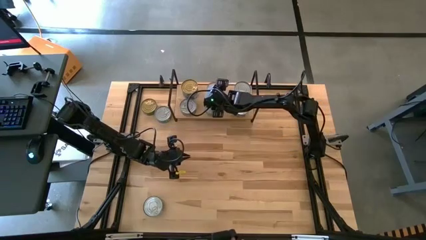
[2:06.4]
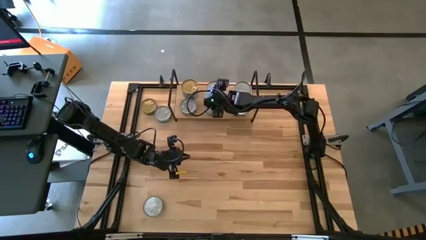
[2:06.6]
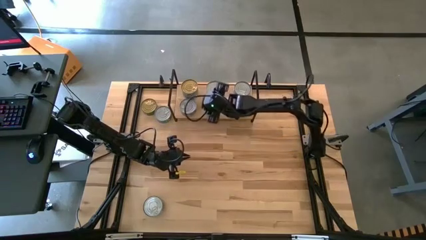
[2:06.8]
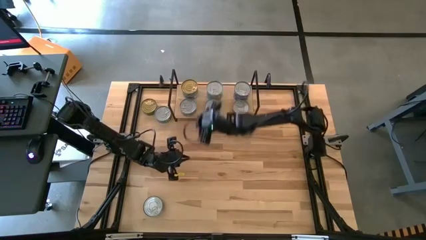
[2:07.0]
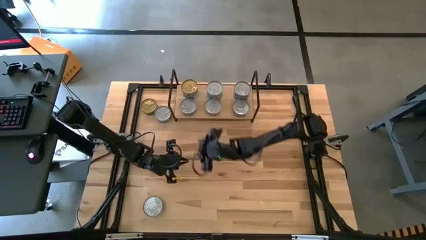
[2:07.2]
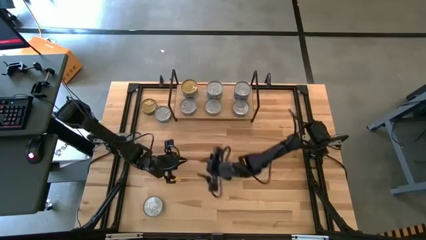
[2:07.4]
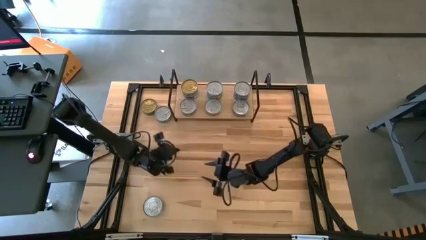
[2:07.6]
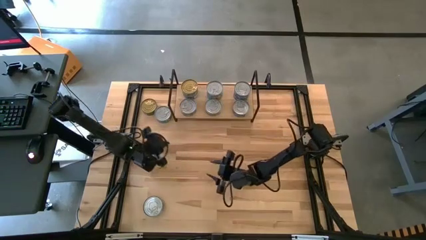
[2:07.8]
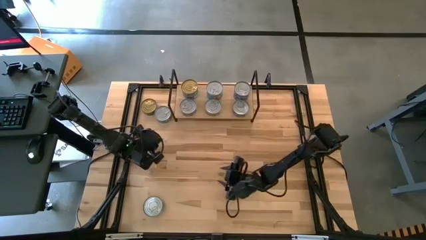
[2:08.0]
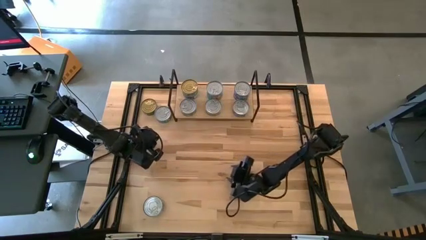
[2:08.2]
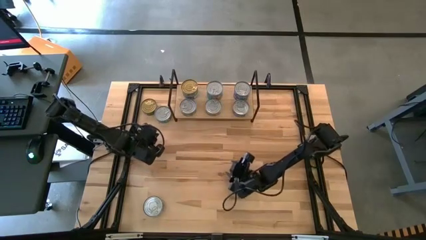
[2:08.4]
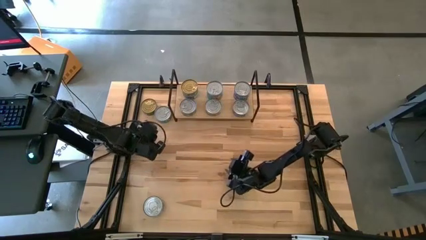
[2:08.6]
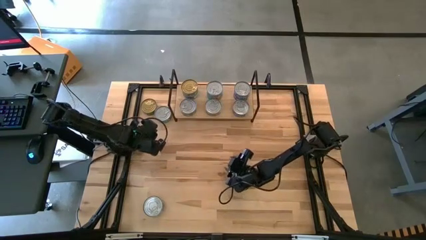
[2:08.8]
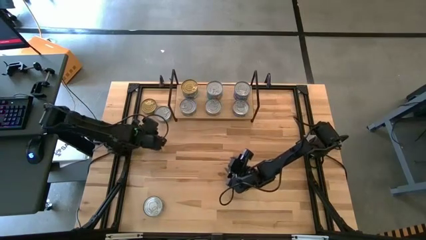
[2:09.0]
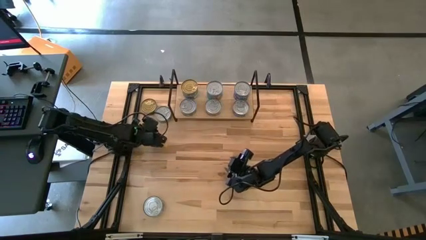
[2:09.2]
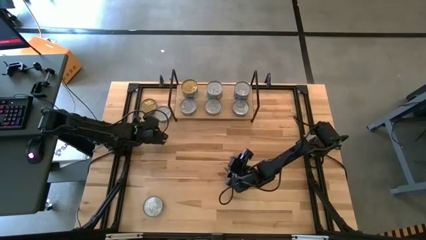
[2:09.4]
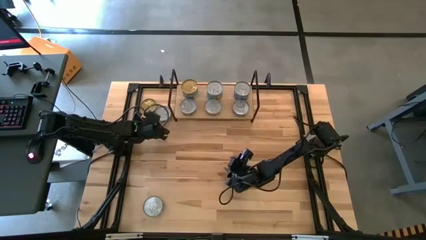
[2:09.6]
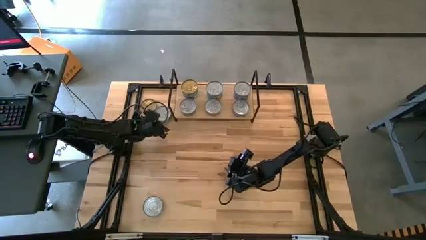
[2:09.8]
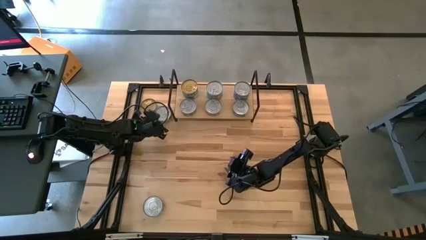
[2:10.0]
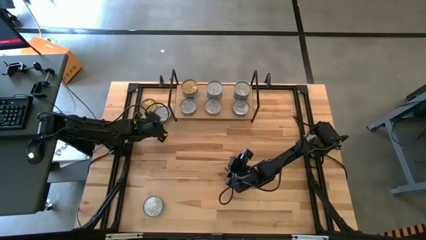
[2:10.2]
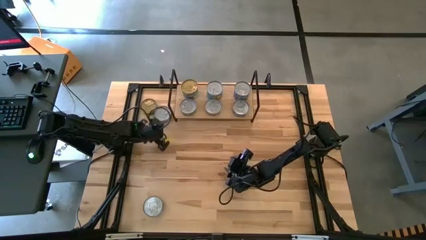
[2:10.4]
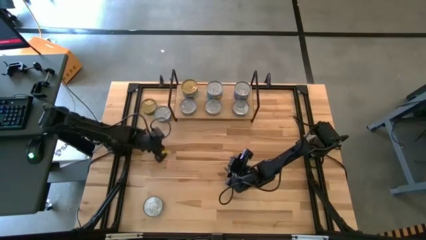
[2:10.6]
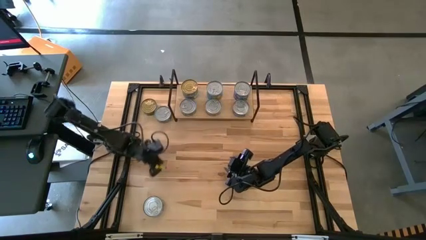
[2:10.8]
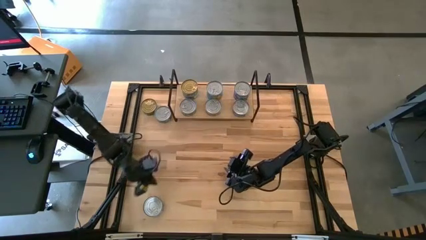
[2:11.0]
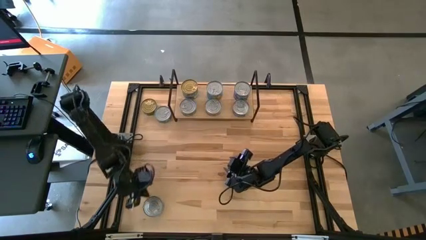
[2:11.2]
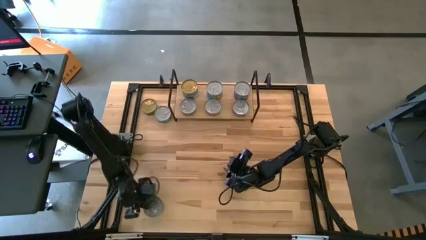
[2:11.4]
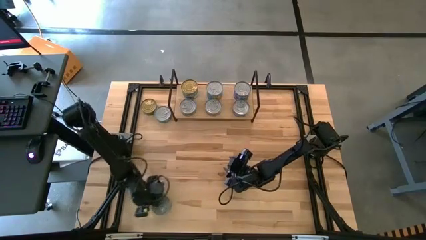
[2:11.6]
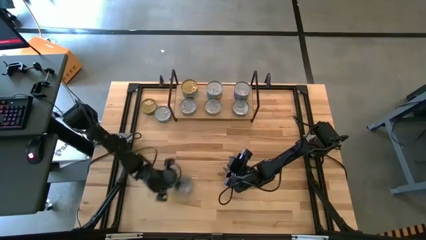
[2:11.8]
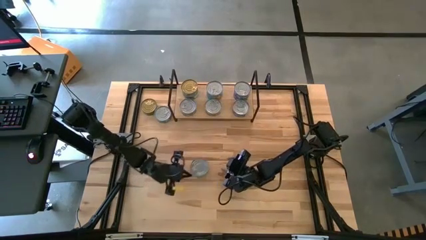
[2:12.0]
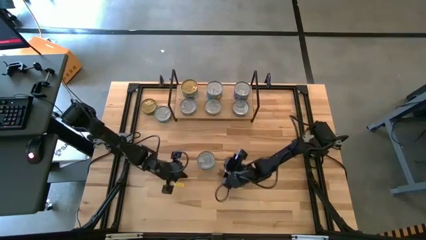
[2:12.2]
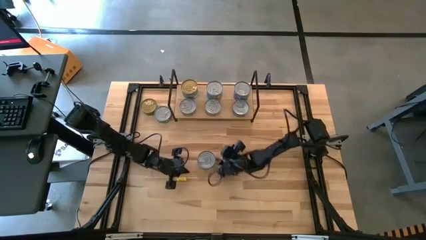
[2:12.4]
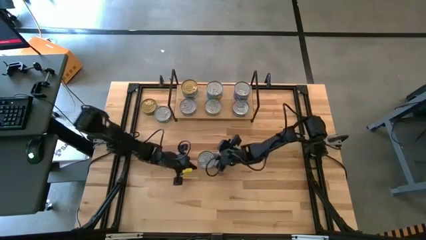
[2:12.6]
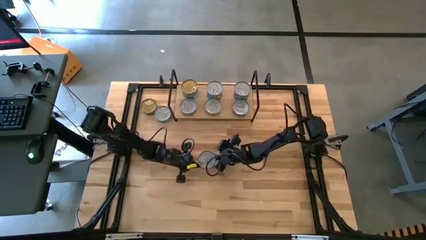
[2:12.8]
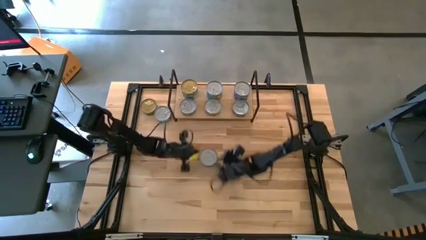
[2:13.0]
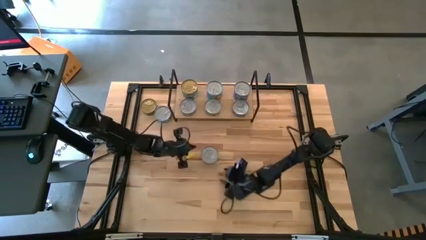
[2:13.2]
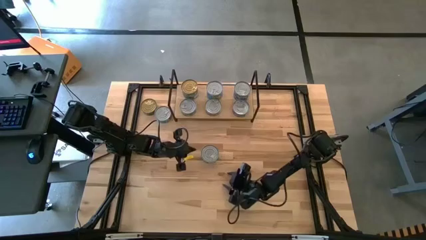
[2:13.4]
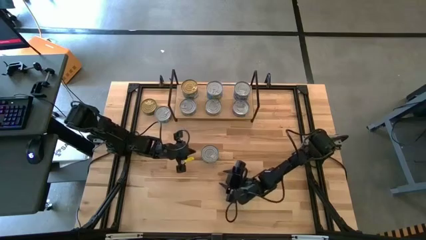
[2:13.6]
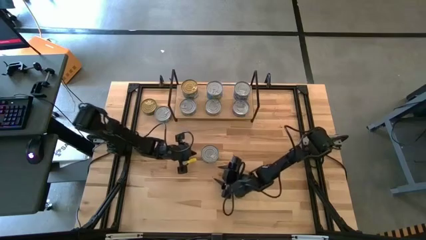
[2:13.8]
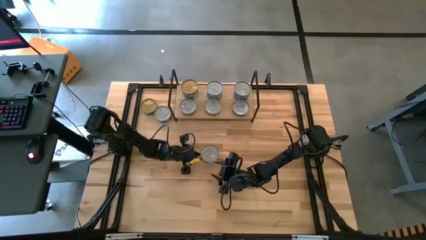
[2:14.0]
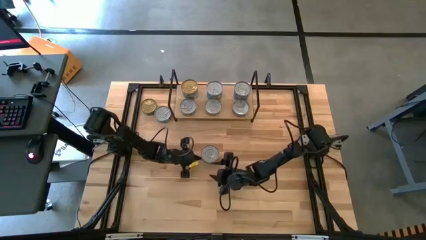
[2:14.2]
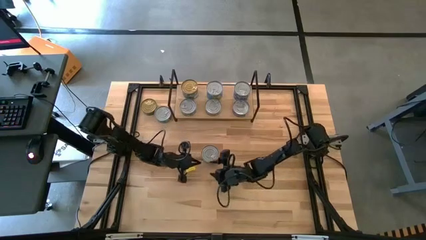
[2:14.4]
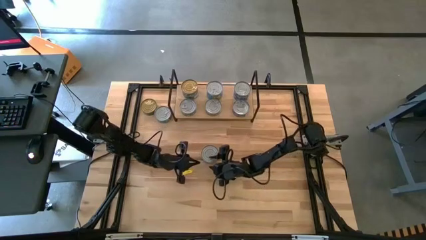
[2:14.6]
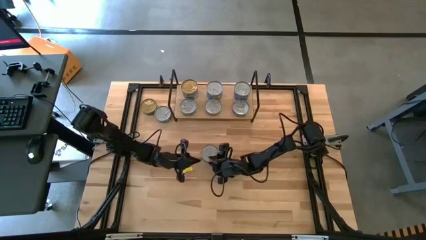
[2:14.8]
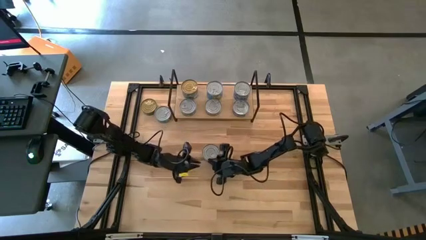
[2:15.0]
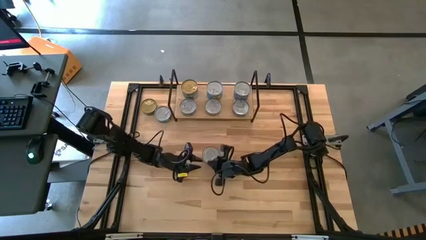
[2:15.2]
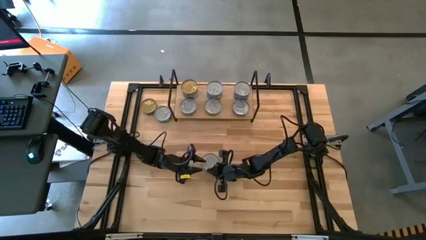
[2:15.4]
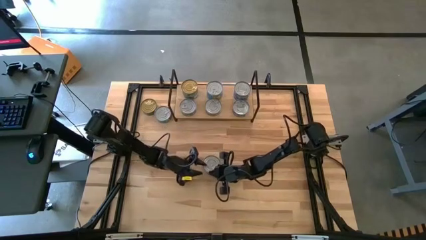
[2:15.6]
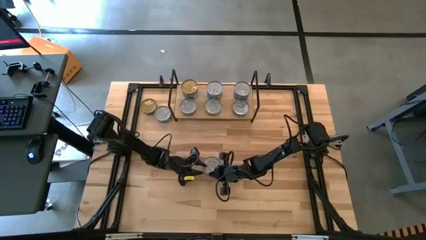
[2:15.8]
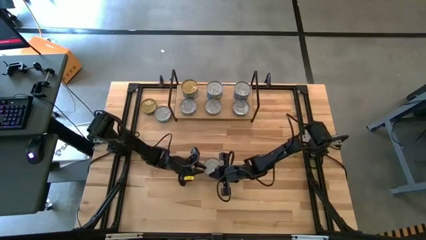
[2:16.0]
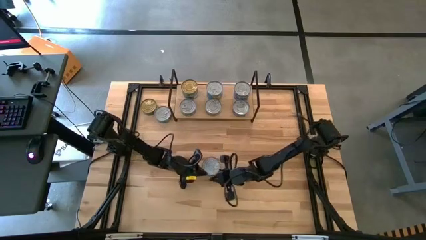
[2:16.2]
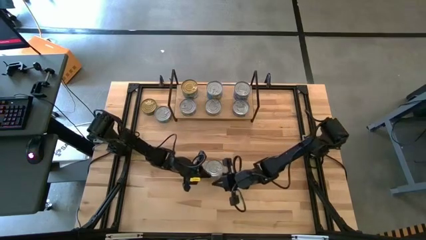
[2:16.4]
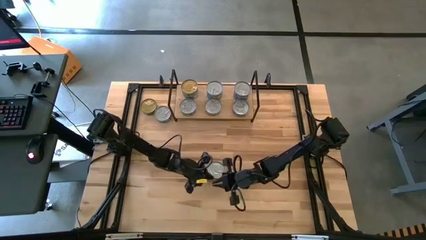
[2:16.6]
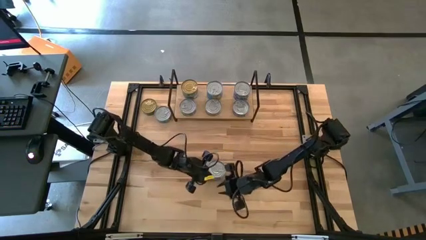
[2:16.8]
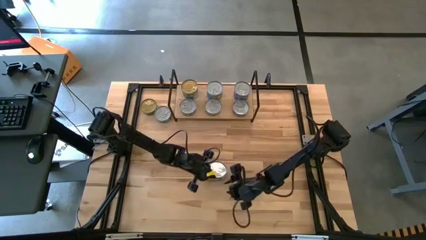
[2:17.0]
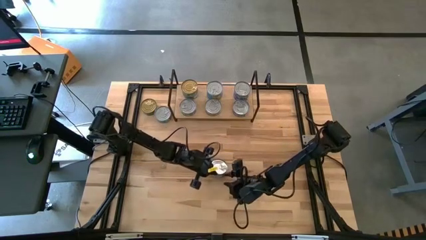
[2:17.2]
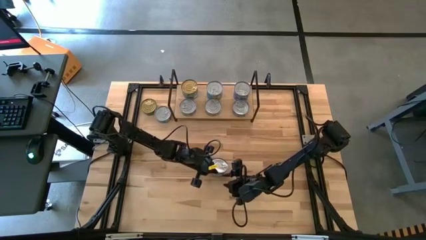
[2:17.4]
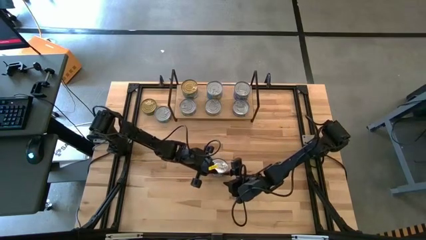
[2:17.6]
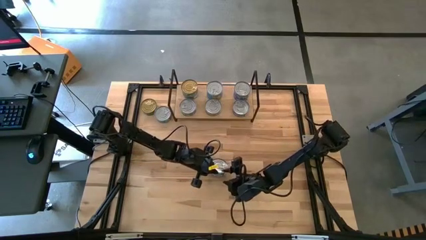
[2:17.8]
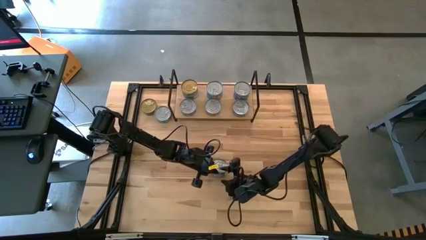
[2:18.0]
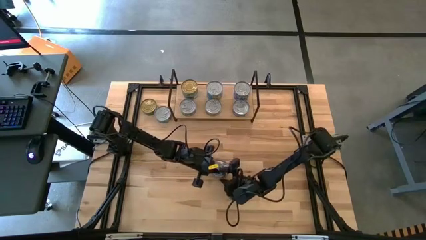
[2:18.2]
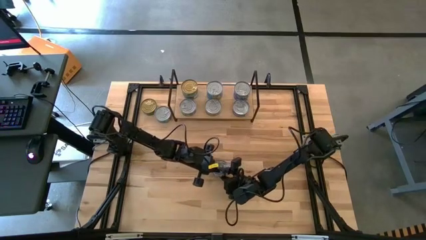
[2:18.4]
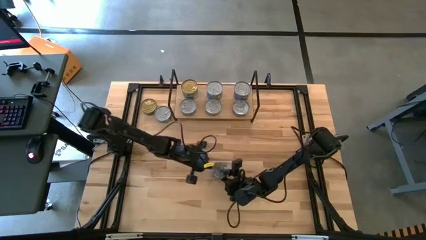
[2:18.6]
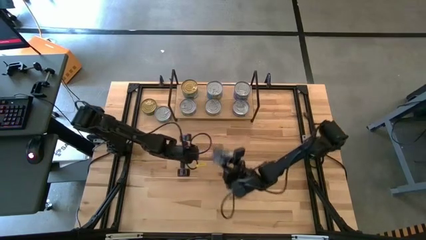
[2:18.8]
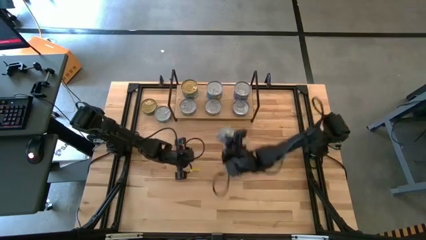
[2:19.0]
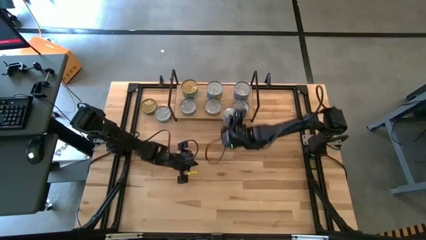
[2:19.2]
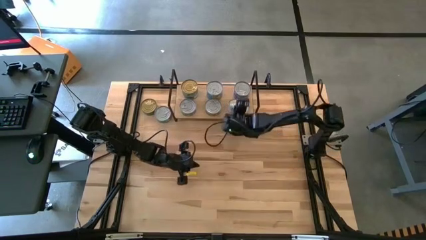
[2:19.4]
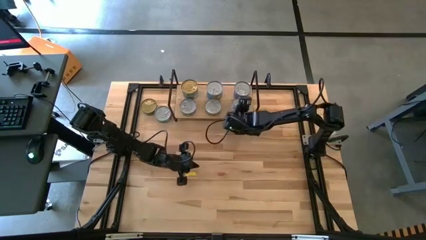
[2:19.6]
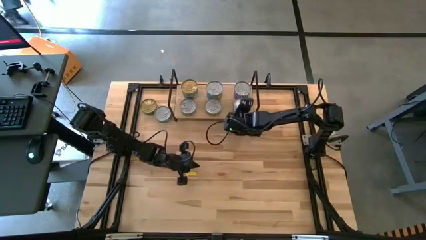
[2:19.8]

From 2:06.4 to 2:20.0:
Task: Stack canned seafood by type on shelf
Stack the blue tuna can on top of the blue tuna can on the shelf
